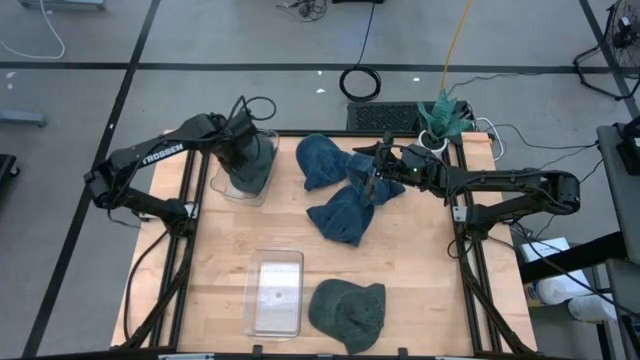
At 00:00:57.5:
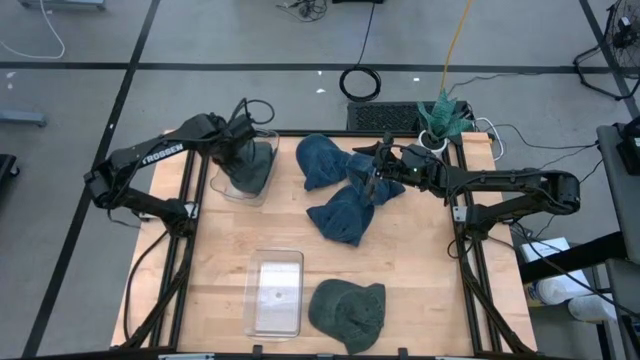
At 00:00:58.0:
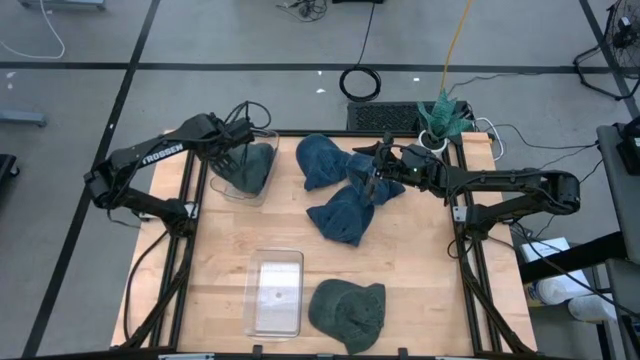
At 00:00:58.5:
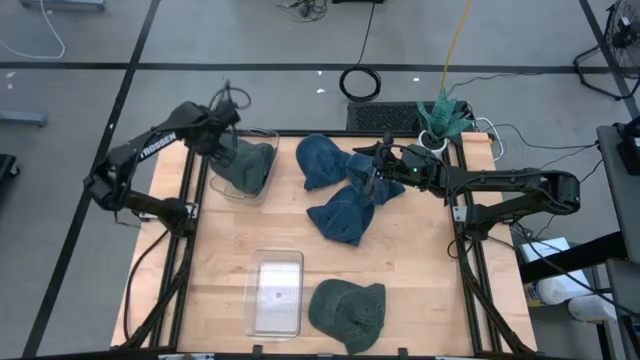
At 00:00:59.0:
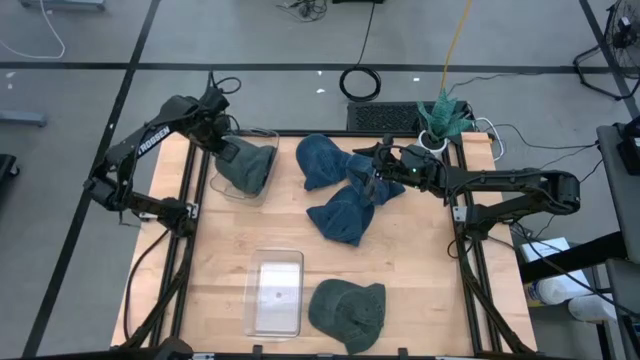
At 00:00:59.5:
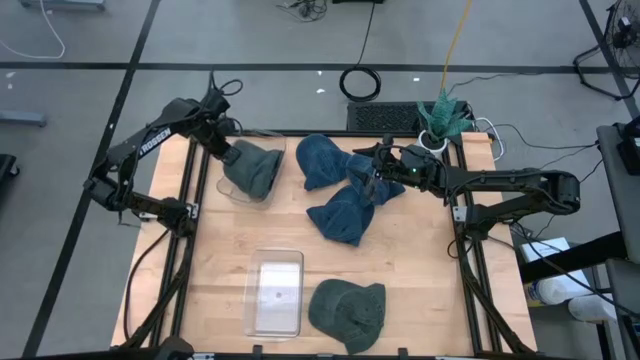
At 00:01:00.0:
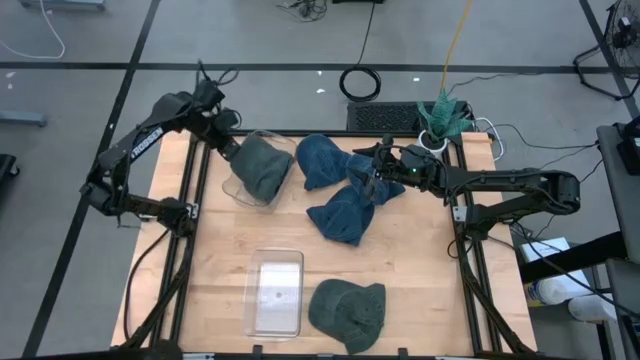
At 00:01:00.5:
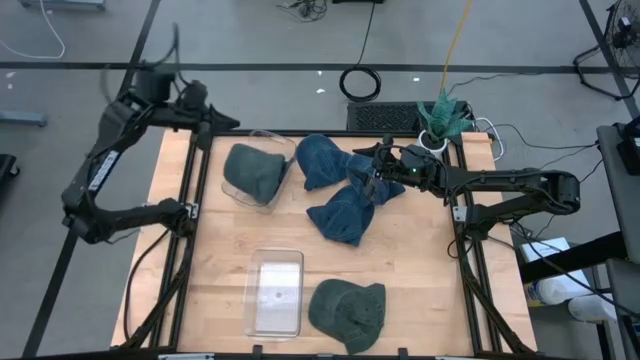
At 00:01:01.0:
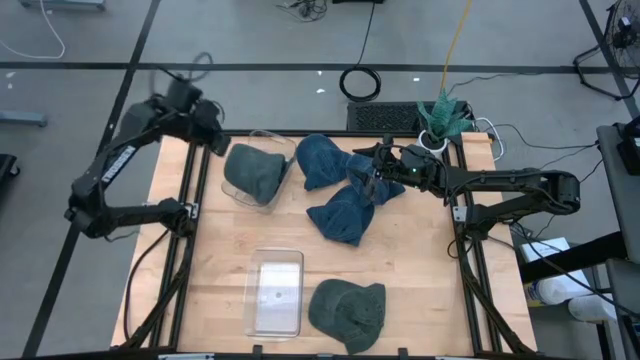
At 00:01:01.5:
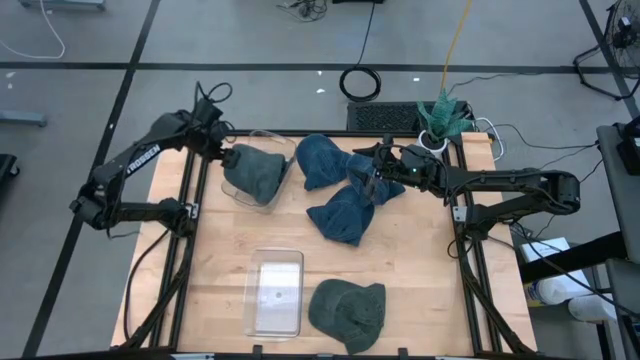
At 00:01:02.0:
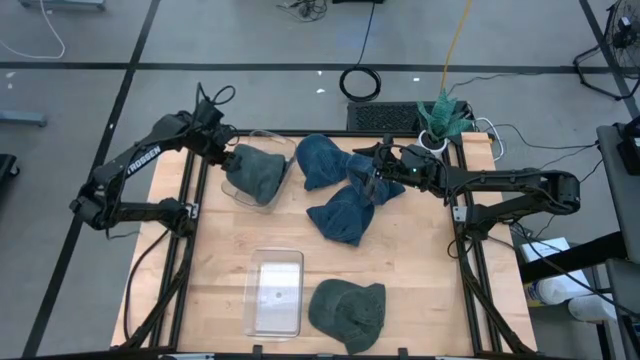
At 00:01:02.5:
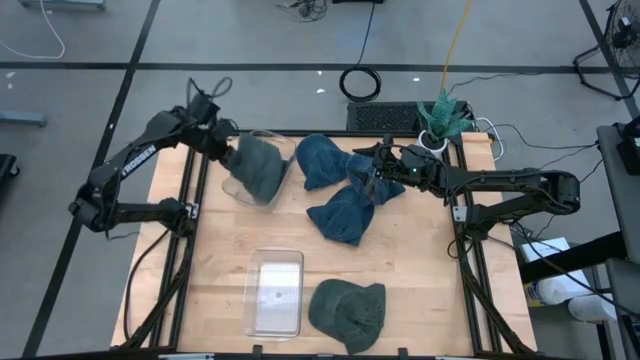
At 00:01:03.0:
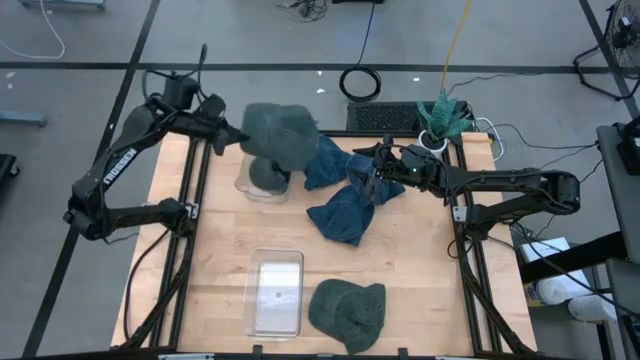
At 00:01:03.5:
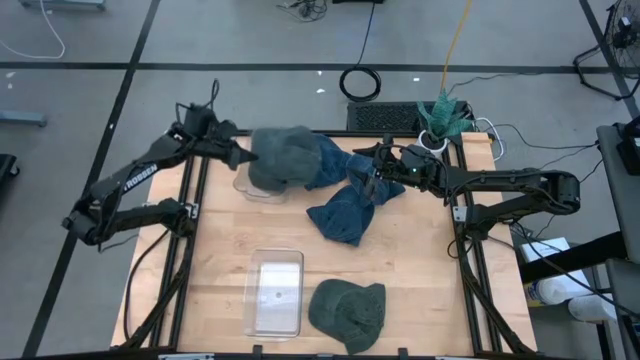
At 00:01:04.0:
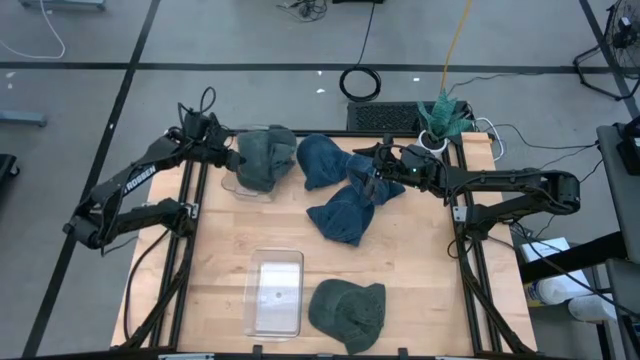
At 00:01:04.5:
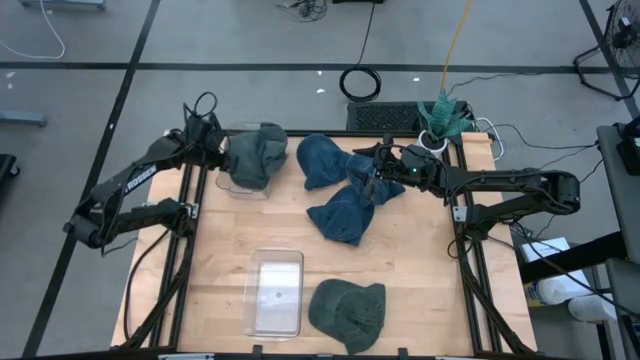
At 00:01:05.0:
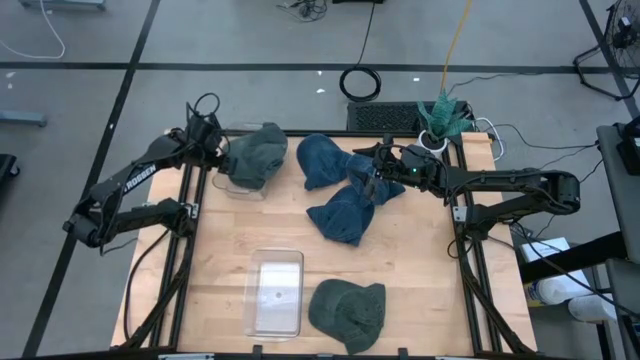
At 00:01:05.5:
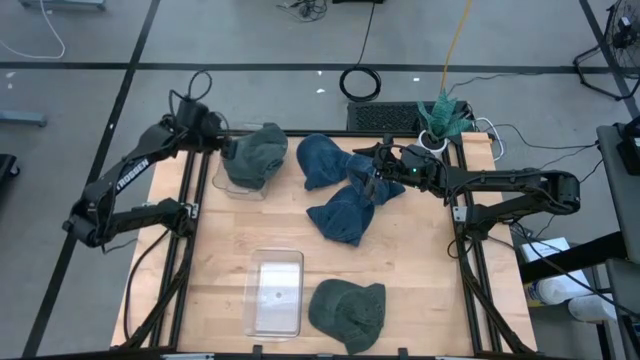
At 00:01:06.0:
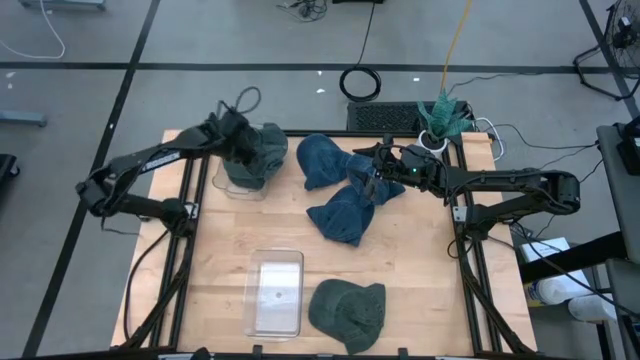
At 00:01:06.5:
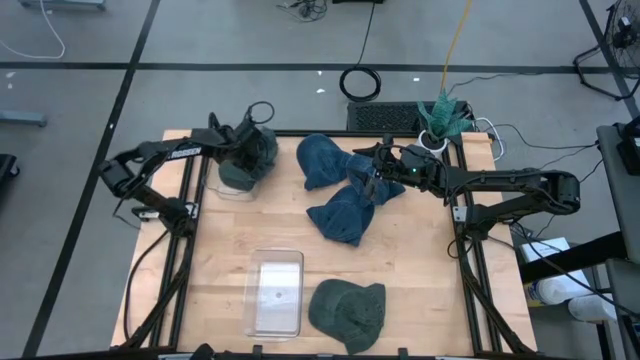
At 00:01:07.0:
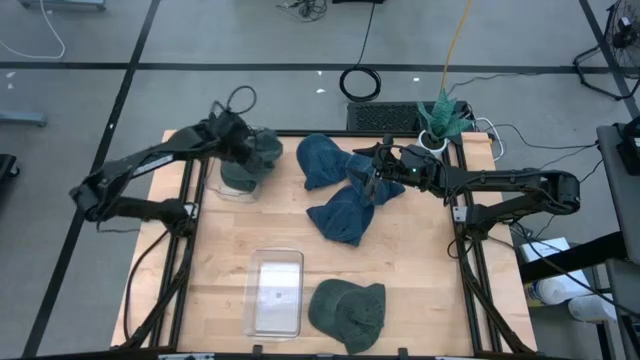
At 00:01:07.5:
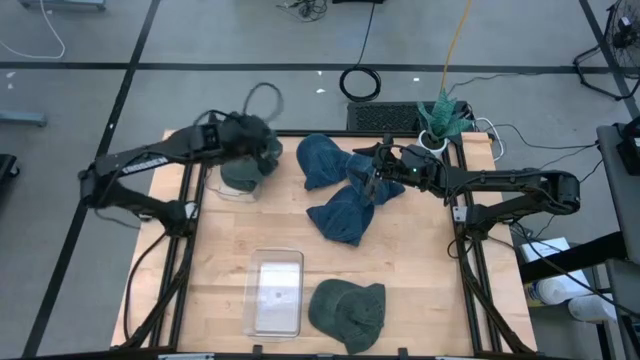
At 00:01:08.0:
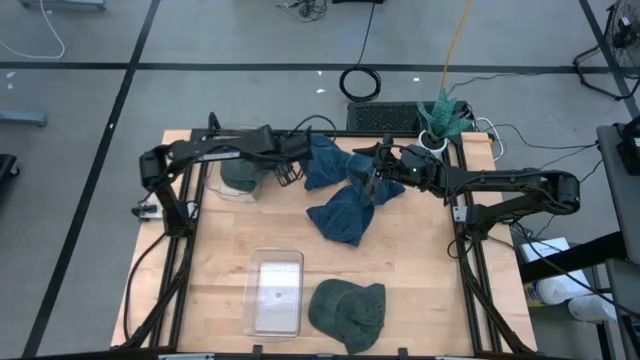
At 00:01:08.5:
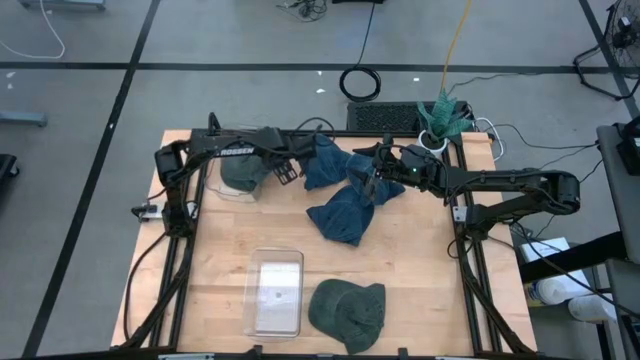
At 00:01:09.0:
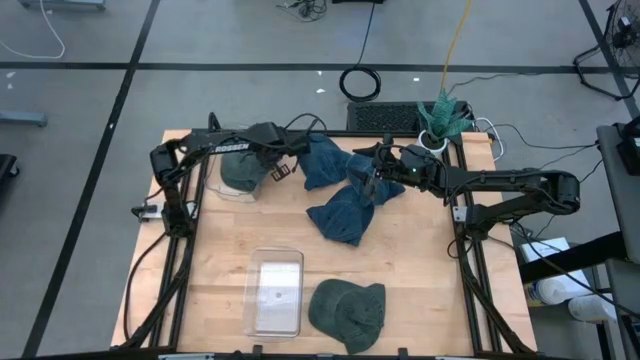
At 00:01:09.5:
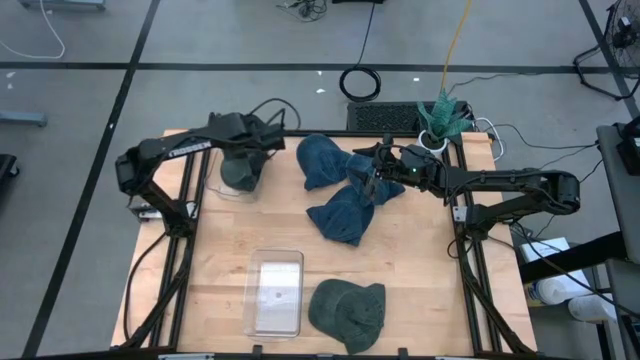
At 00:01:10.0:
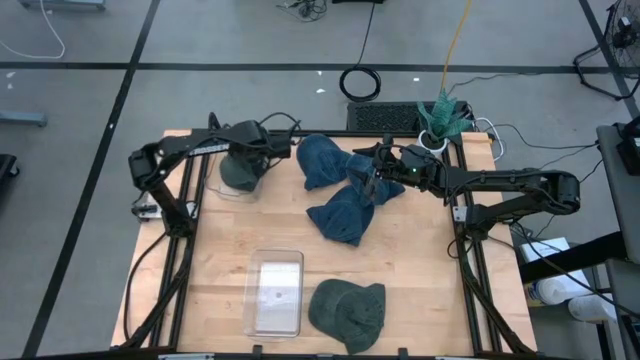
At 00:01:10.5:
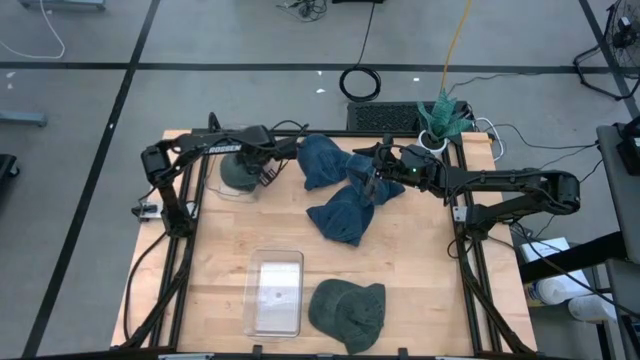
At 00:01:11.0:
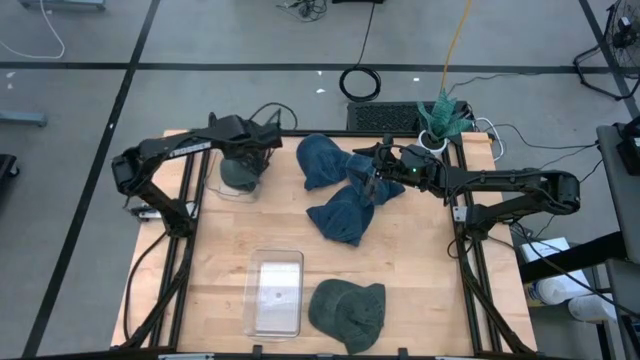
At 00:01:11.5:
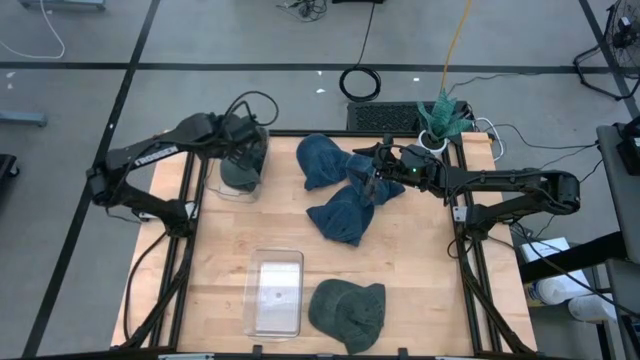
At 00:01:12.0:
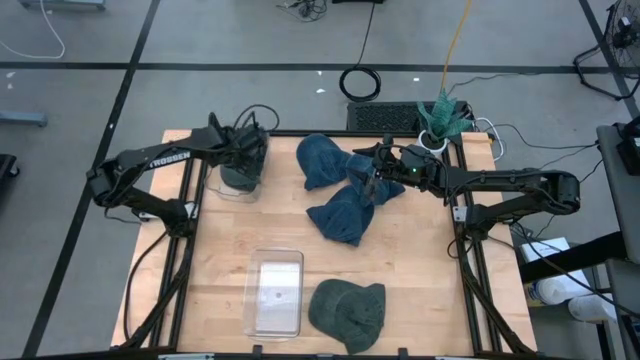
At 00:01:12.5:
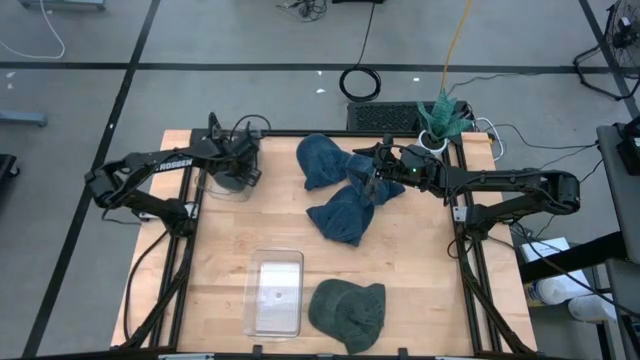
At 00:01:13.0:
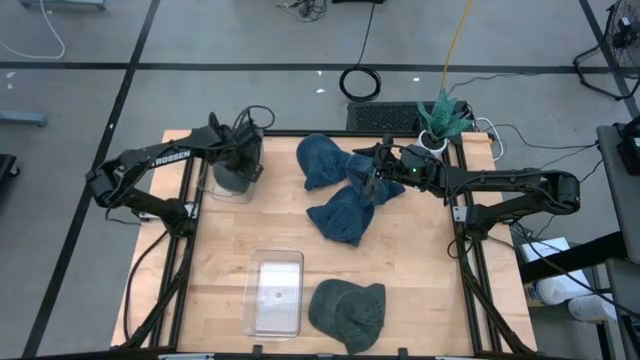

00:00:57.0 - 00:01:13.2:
Task: Pick & Place hat
Put the top green cap into the top transparent bin

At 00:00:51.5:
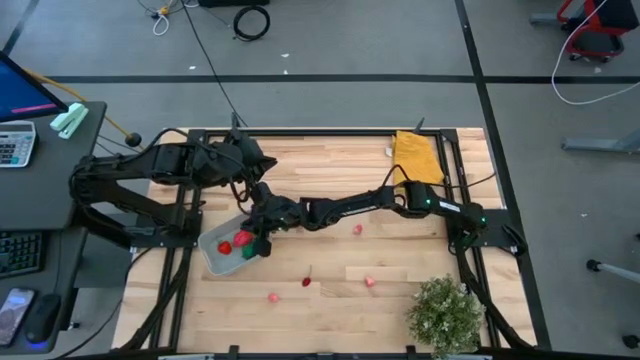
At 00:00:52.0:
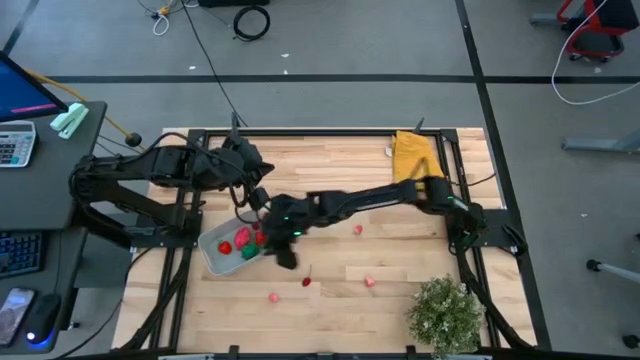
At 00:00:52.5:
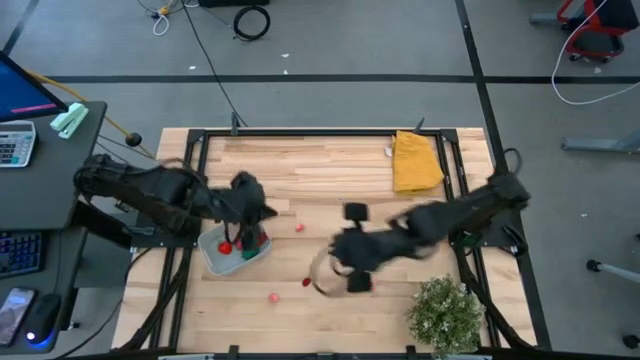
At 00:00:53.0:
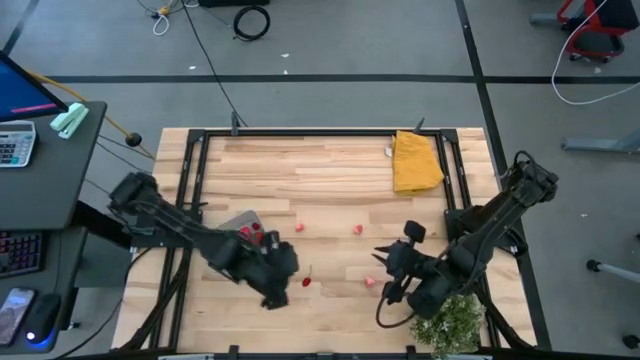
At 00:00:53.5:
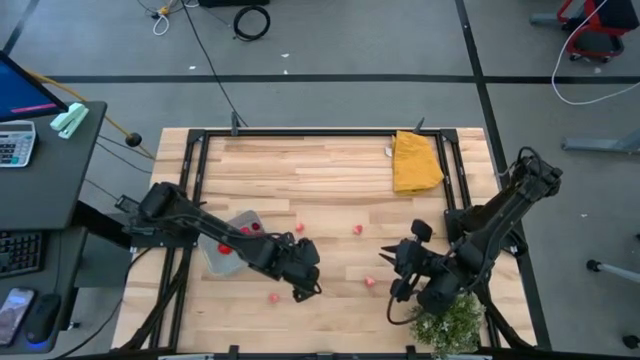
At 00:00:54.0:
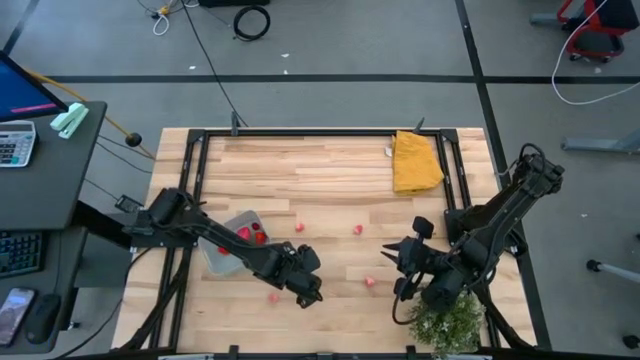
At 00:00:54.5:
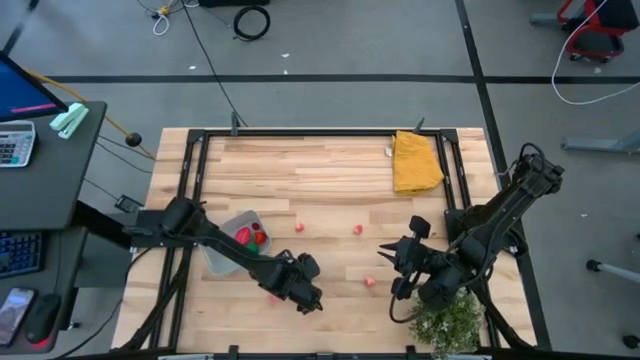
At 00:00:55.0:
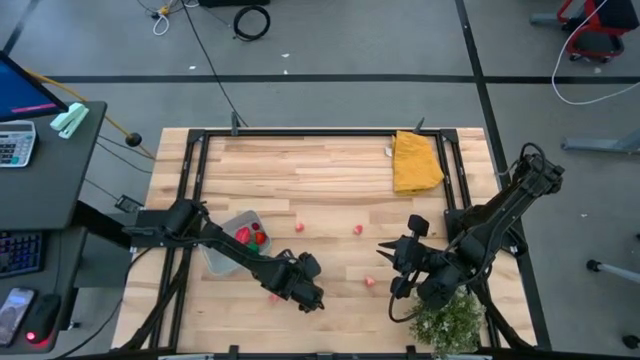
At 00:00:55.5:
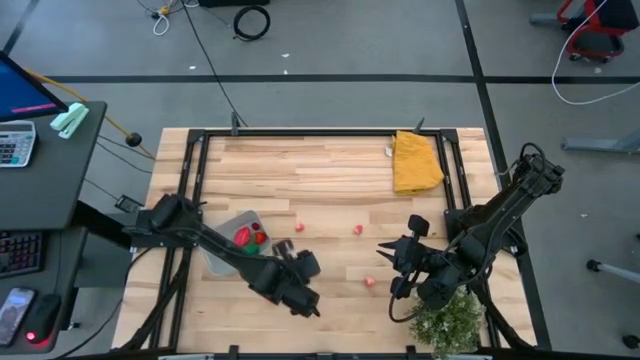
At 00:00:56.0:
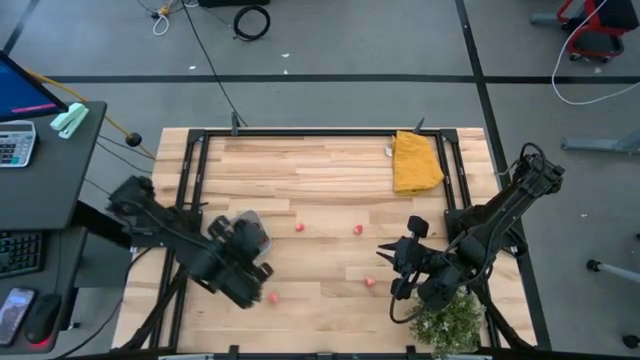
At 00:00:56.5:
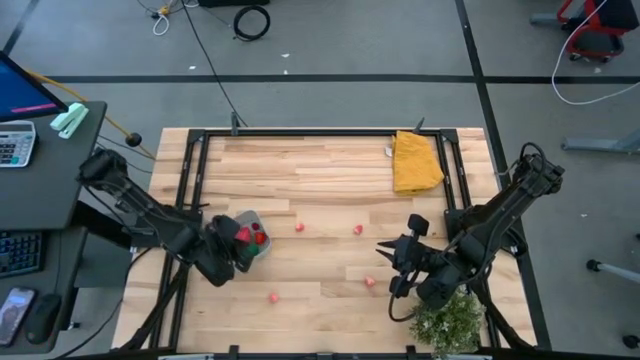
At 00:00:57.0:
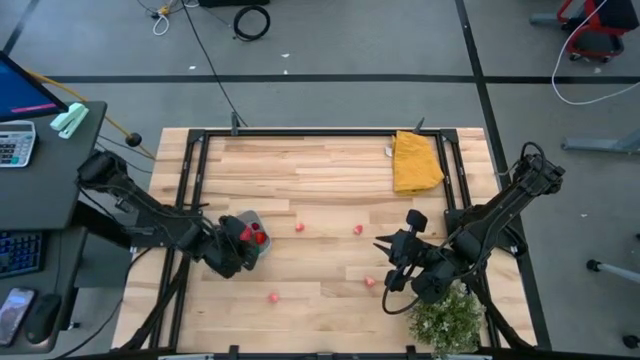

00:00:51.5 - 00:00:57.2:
Task: Pick and placing Produce into tupperware
Put the red cherry into the gray bin
